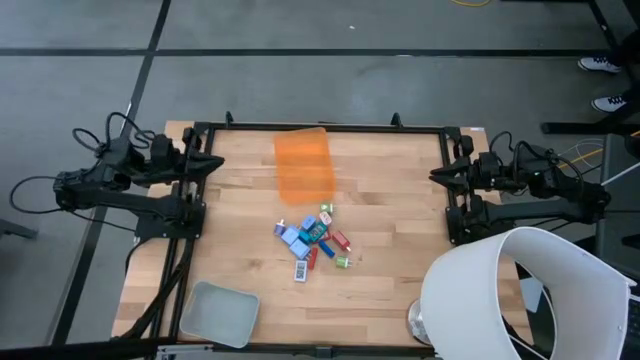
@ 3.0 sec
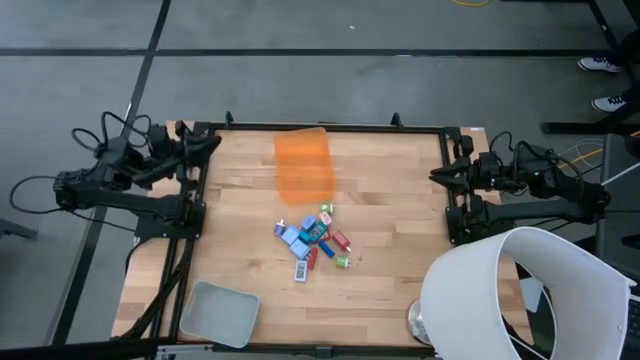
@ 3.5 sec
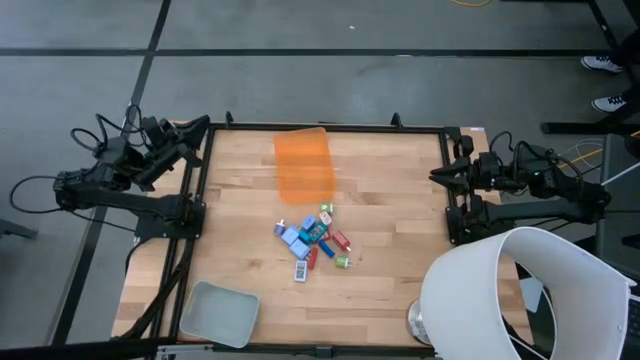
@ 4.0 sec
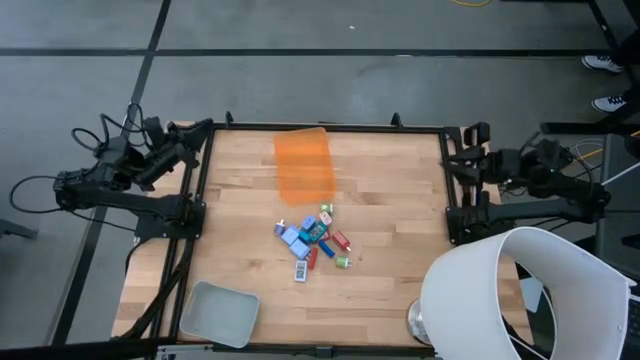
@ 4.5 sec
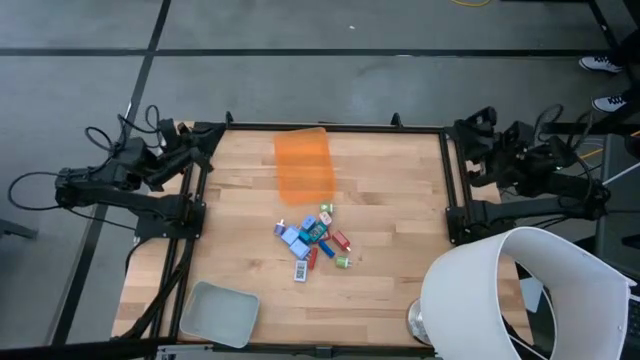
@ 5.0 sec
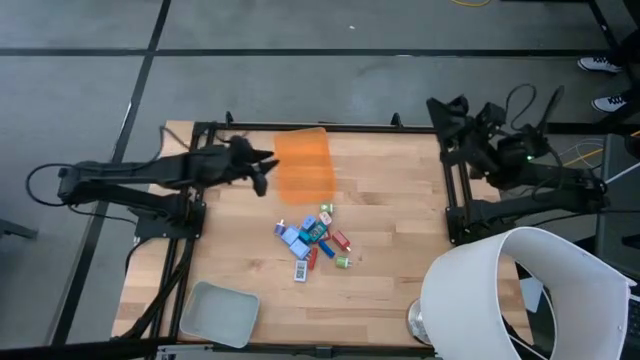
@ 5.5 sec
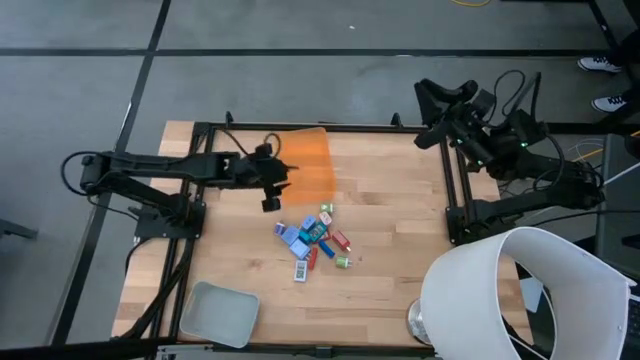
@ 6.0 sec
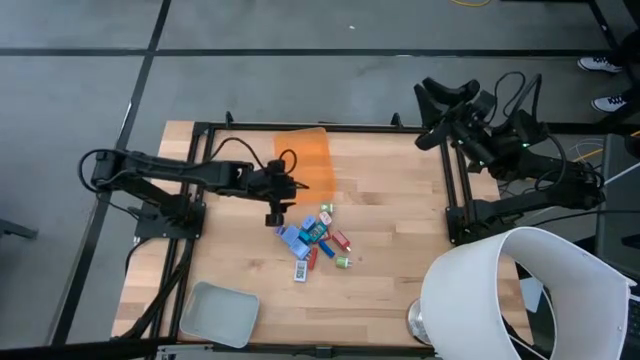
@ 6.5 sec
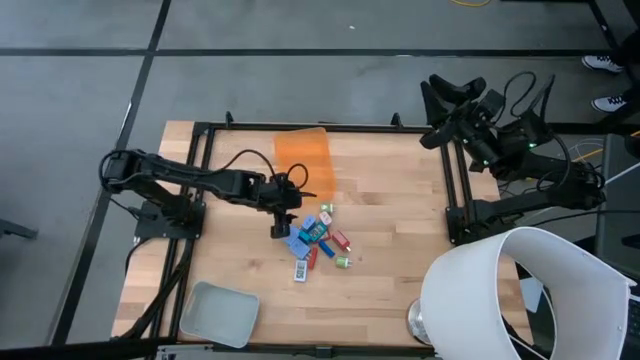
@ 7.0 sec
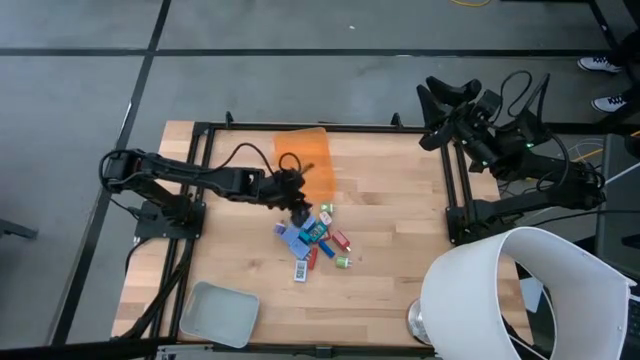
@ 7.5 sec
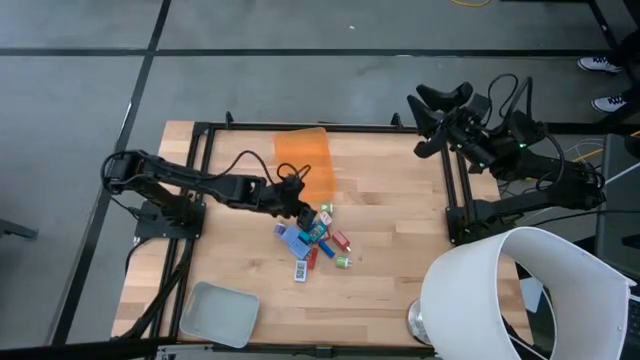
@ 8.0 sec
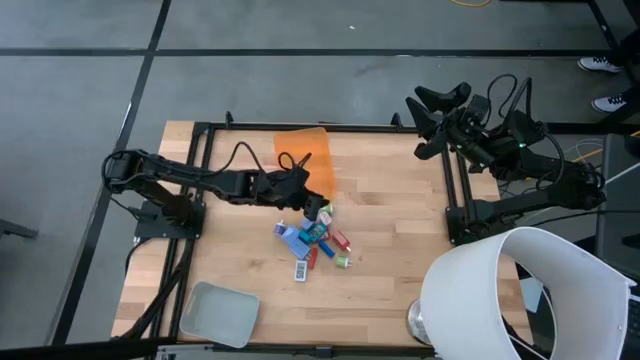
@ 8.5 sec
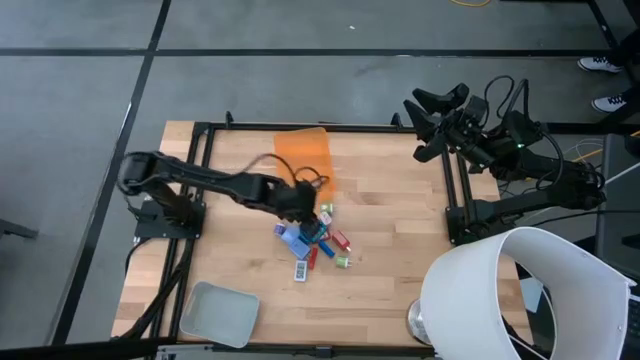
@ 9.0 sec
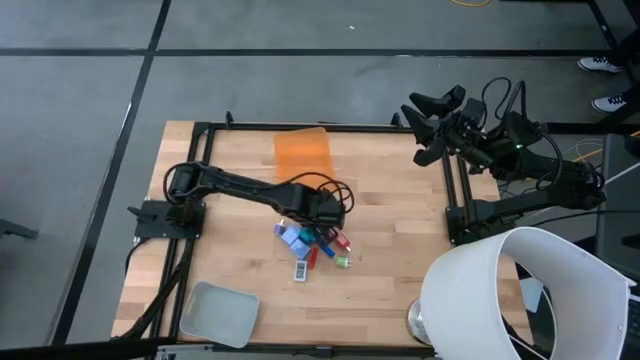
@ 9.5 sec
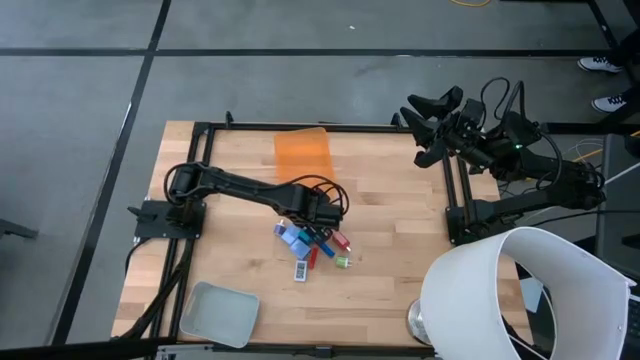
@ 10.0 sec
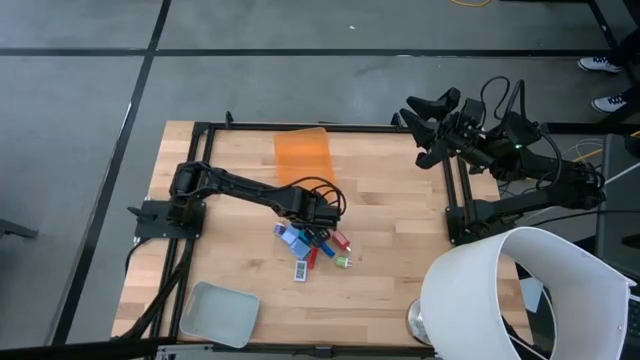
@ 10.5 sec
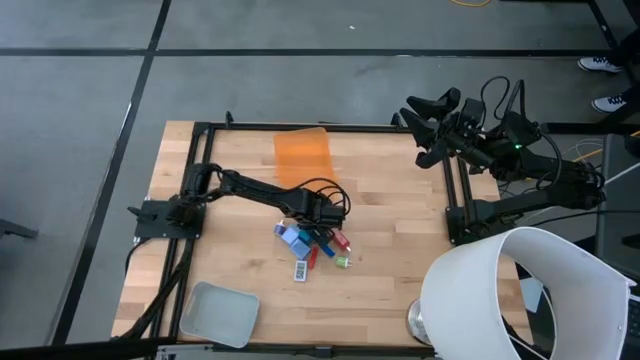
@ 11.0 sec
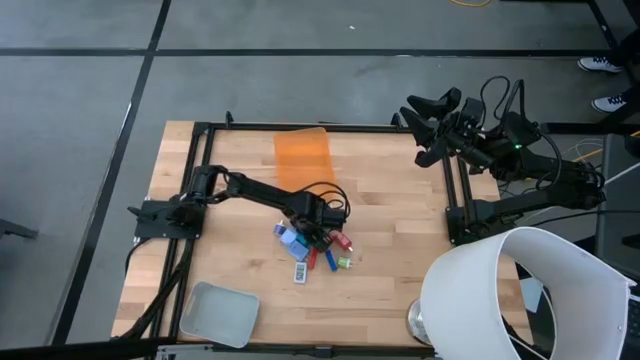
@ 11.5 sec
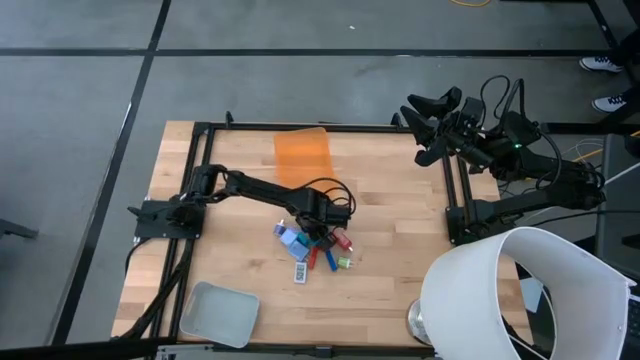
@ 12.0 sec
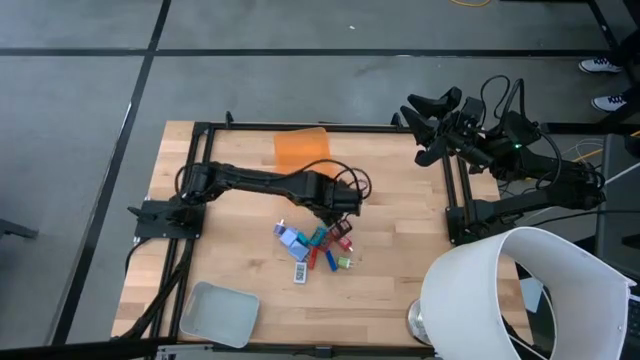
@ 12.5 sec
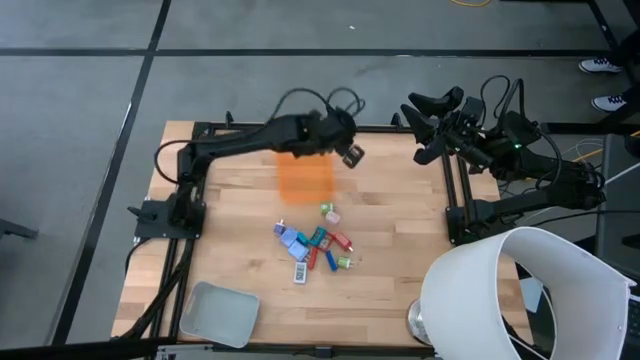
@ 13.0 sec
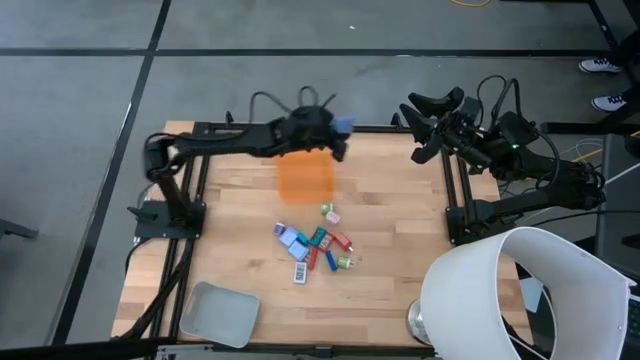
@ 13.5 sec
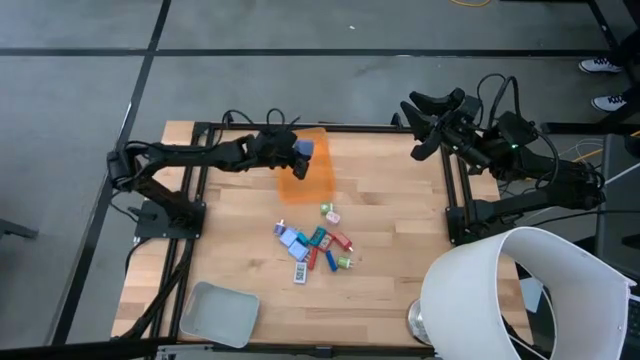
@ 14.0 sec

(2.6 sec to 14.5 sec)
Task: Pick & Place Office items
Put the top light blue charger adapter into the orange bin

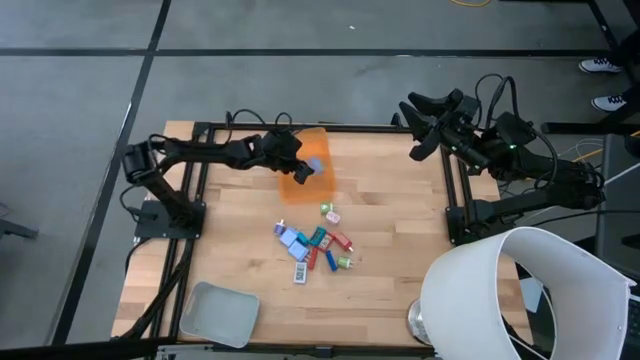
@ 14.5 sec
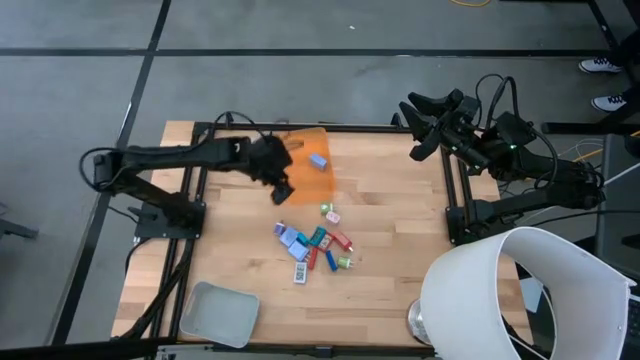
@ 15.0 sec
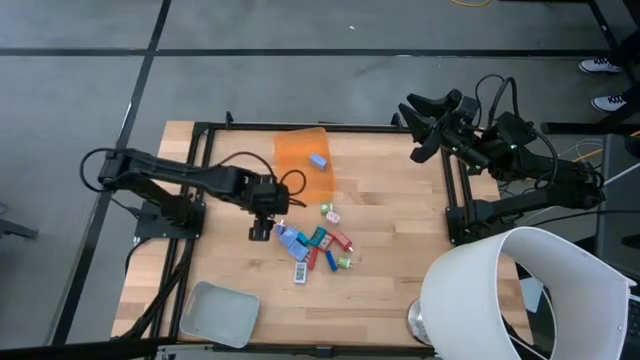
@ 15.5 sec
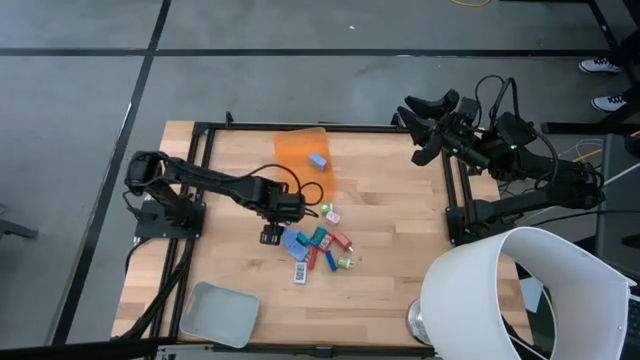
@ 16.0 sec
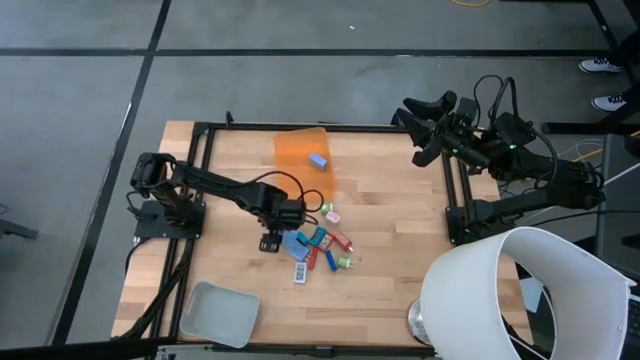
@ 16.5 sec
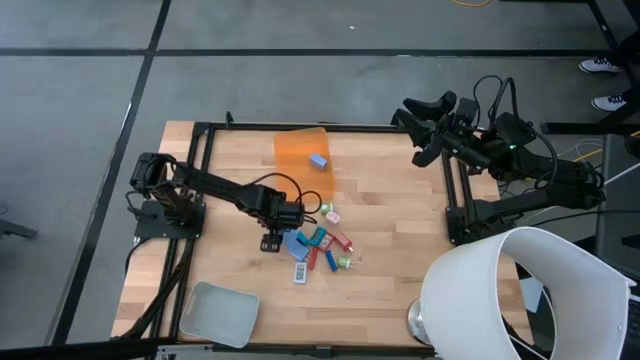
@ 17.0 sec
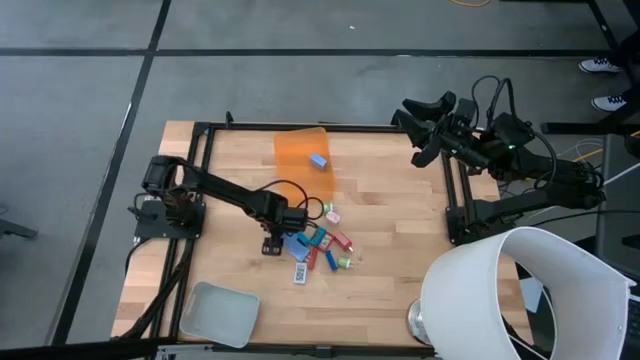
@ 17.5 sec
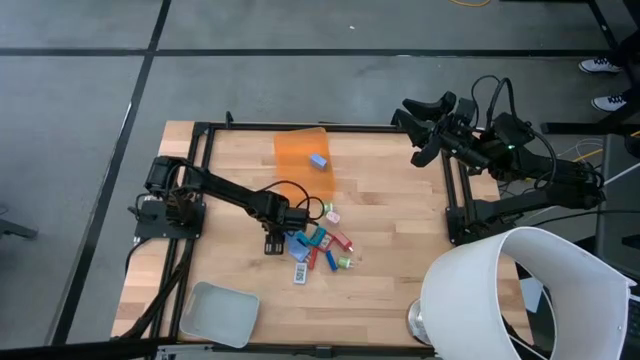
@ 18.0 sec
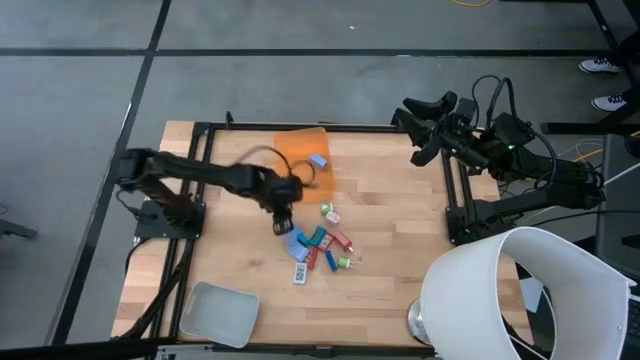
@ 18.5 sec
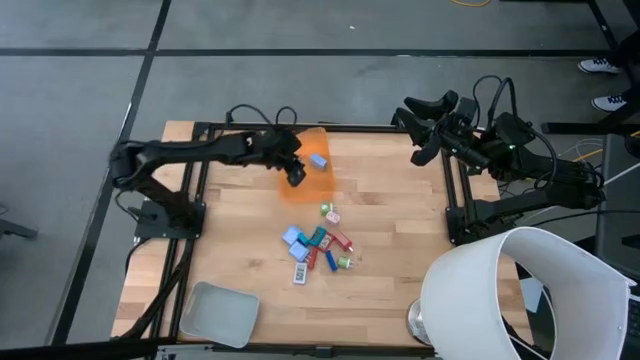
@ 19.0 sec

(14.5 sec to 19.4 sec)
Put the purple charger adapter into the orange bin

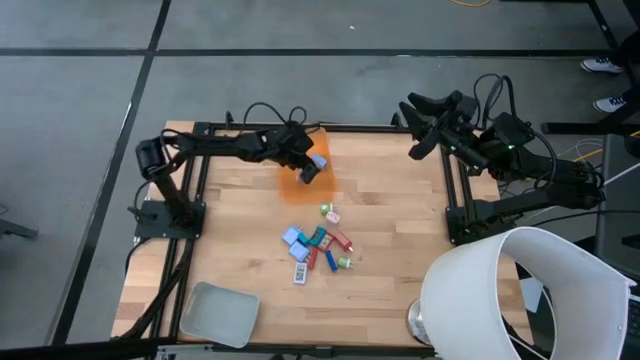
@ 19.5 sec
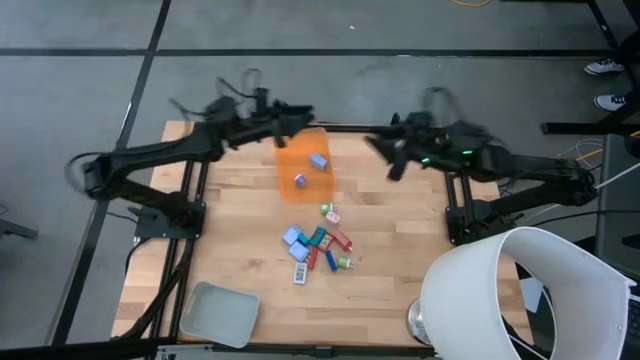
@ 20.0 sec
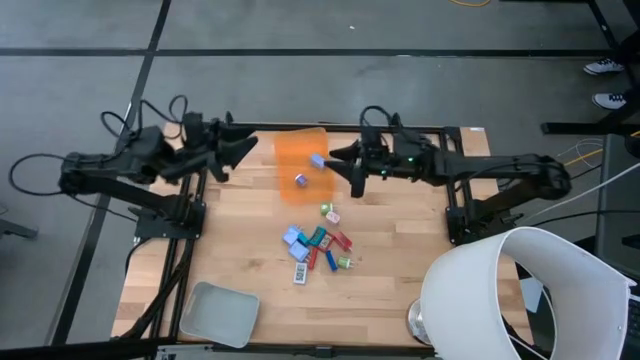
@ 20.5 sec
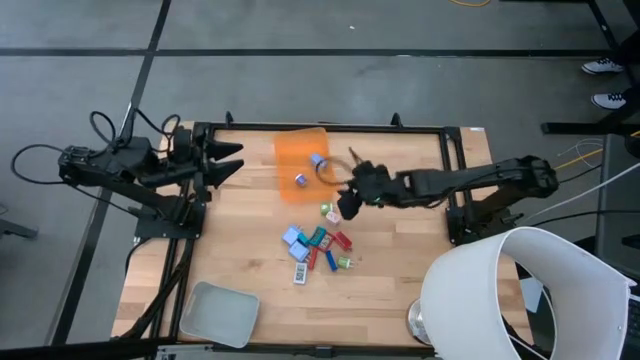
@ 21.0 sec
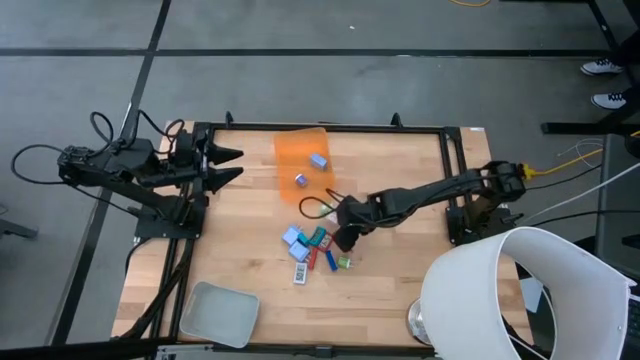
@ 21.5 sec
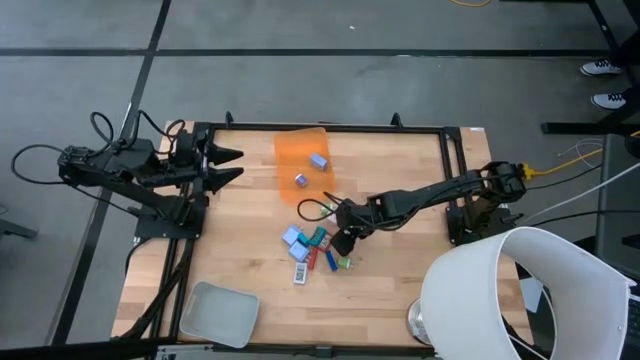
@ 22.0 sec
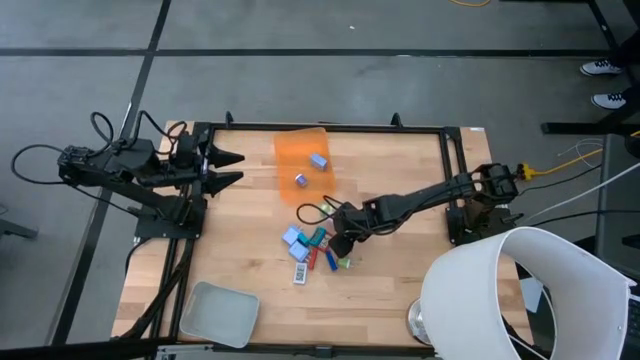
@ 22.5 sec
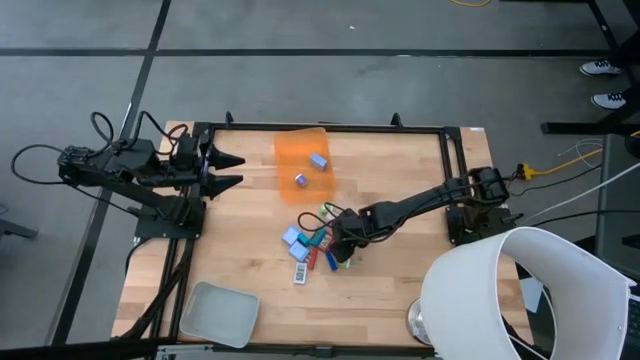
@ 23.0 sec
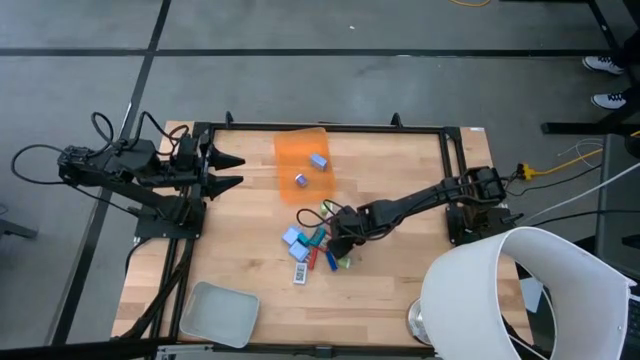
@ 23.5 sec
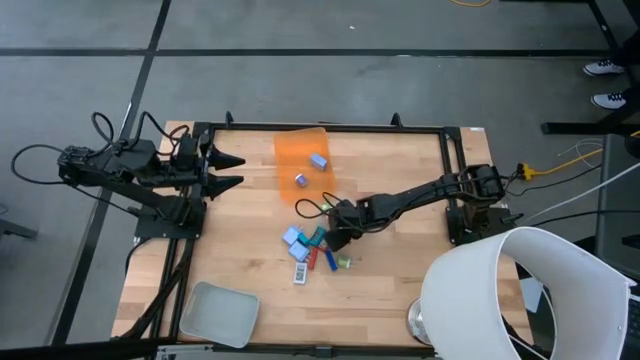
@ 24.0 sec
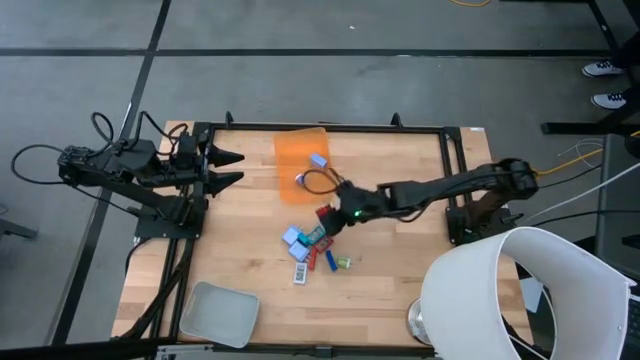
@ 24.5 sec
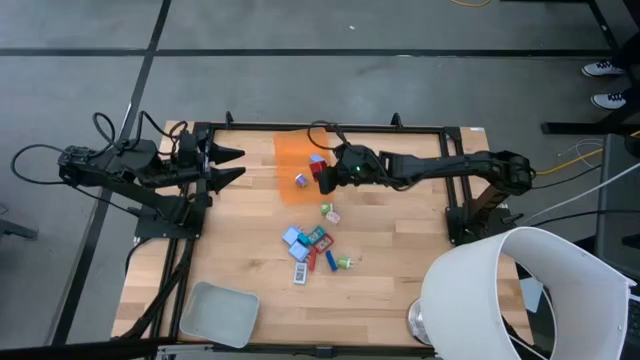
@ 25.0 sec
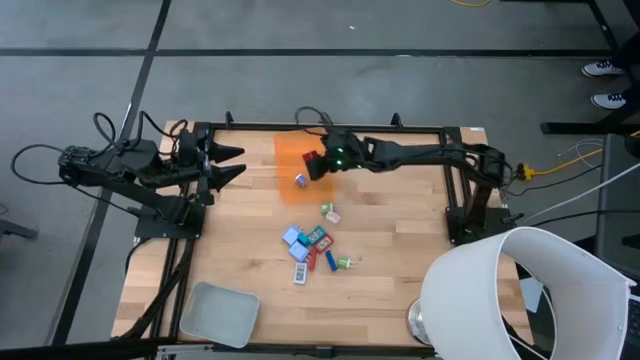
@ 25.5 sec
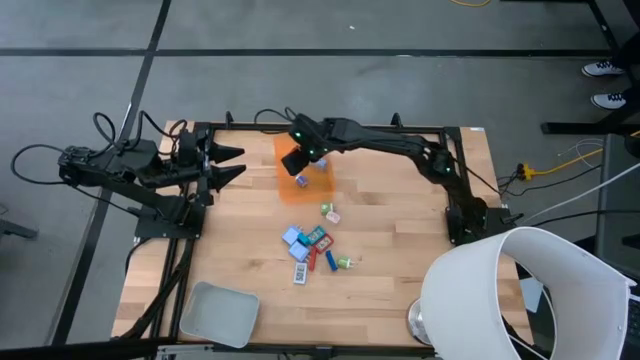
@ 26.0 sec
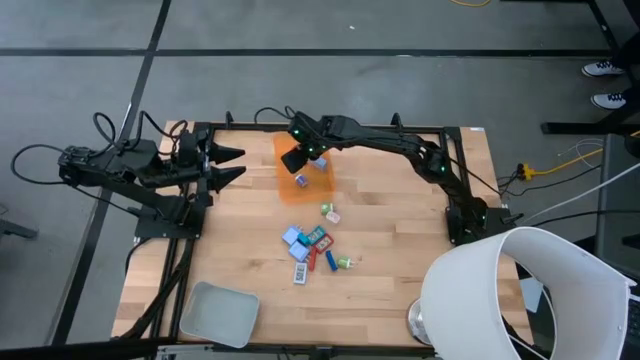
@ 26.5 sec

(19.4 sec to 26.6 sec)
Put the red charger adapter into the orange bin
